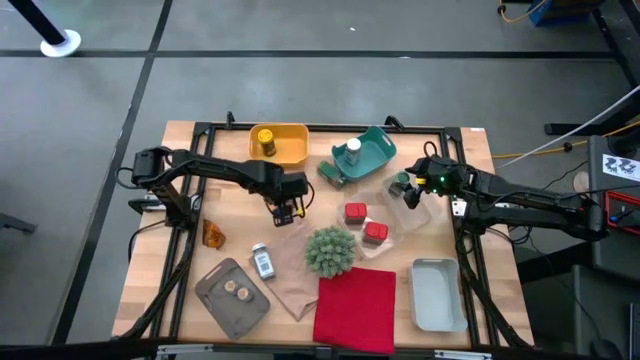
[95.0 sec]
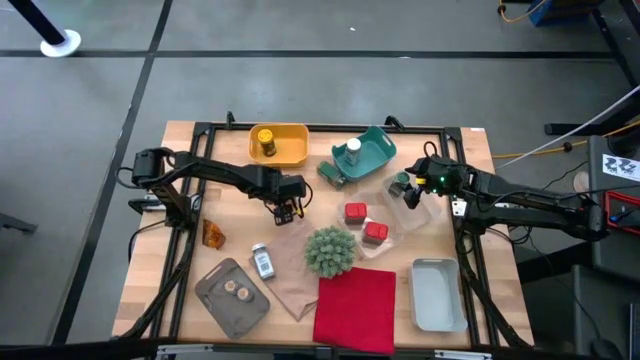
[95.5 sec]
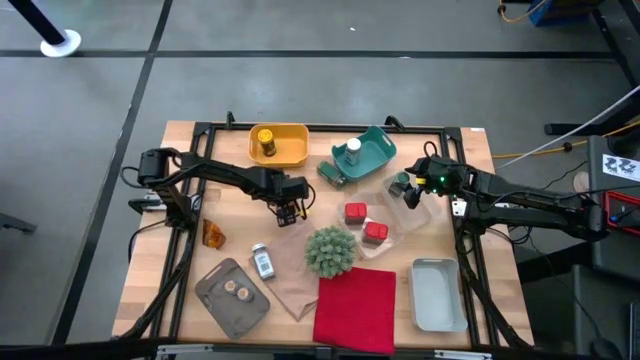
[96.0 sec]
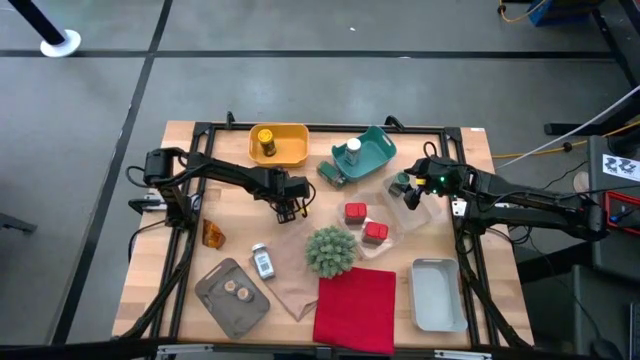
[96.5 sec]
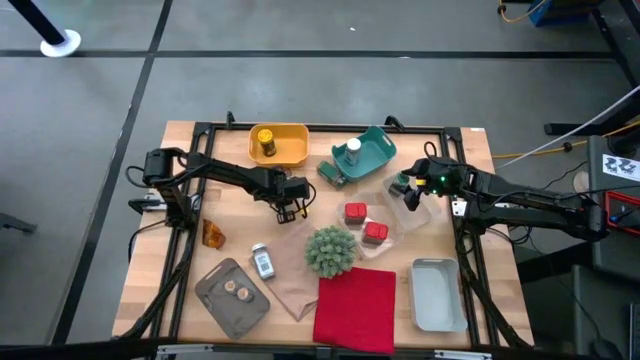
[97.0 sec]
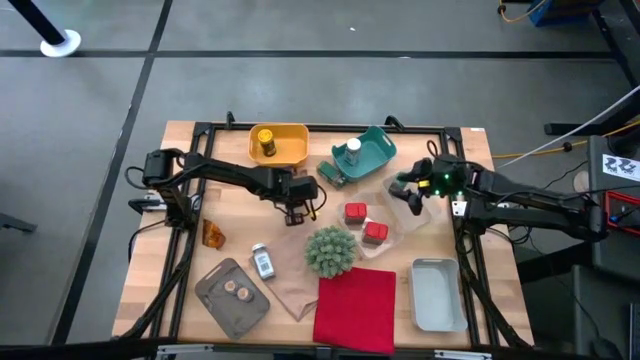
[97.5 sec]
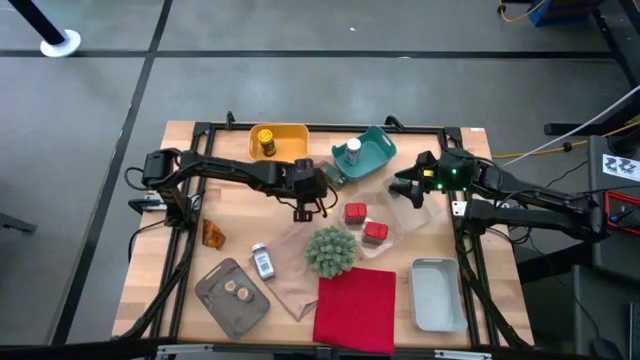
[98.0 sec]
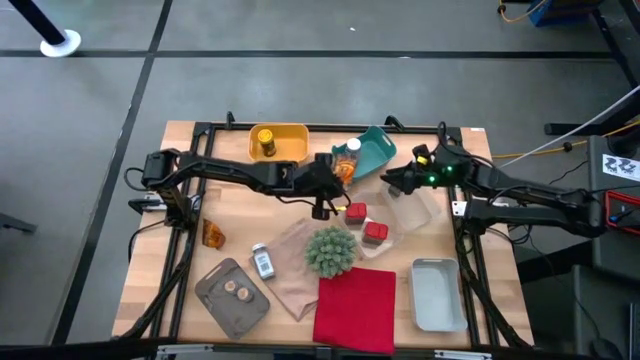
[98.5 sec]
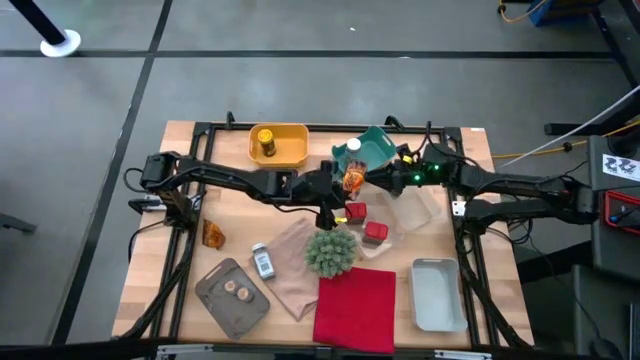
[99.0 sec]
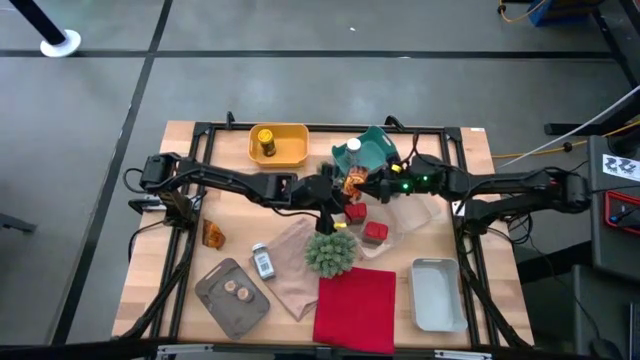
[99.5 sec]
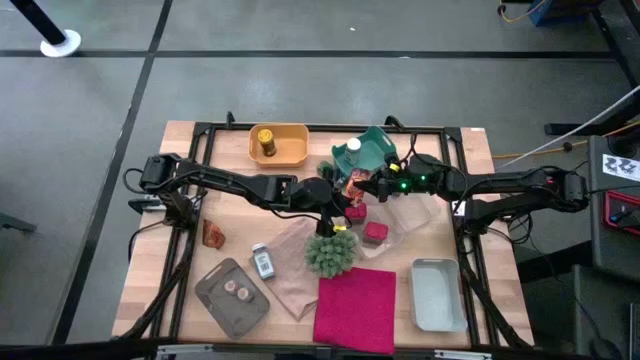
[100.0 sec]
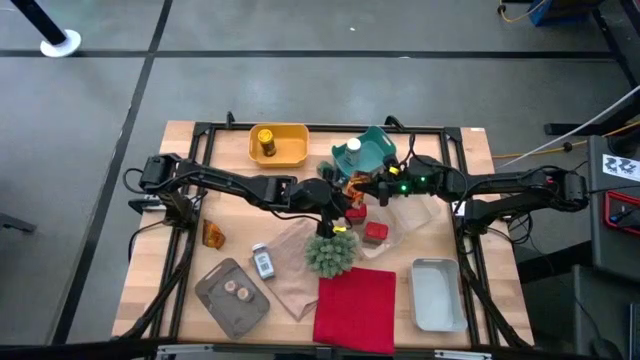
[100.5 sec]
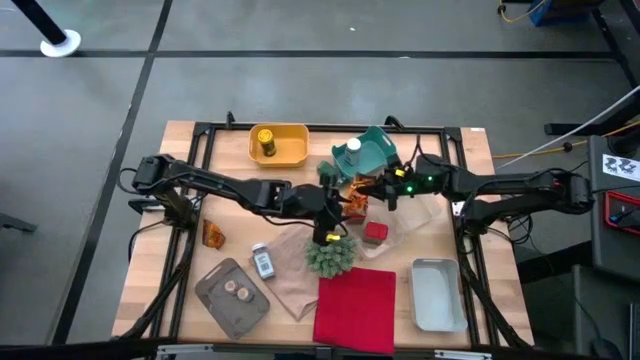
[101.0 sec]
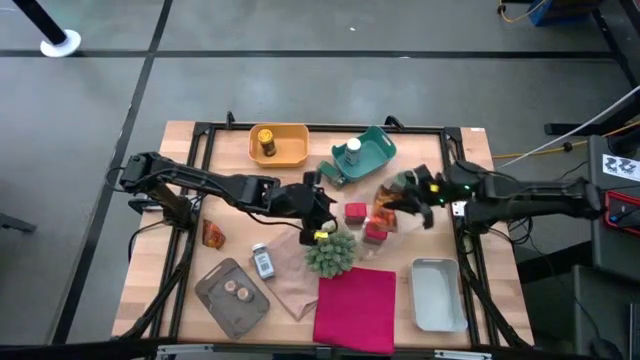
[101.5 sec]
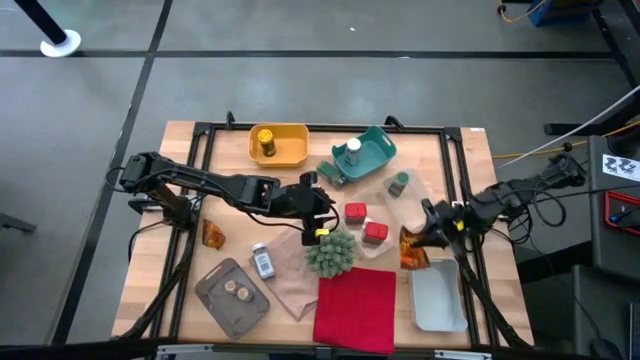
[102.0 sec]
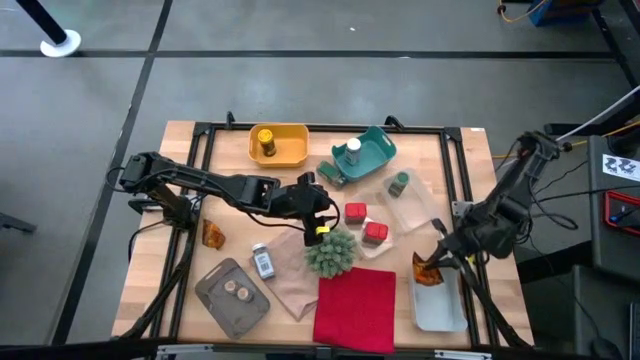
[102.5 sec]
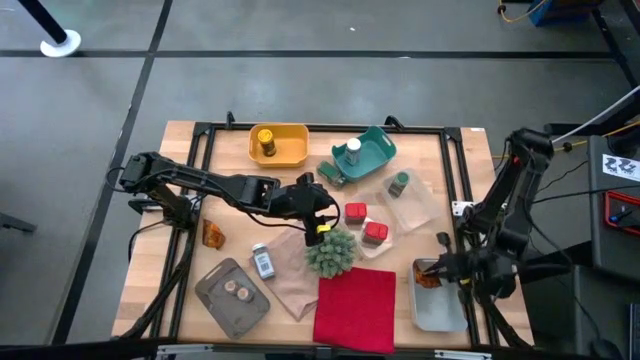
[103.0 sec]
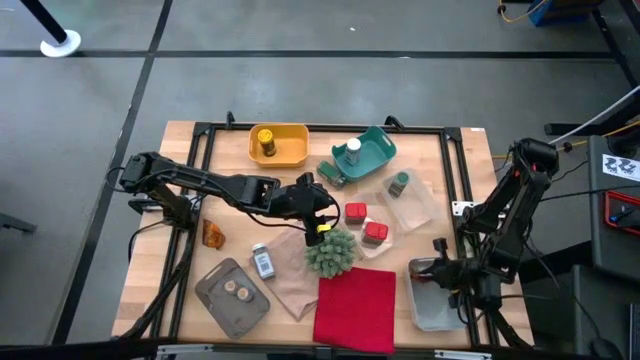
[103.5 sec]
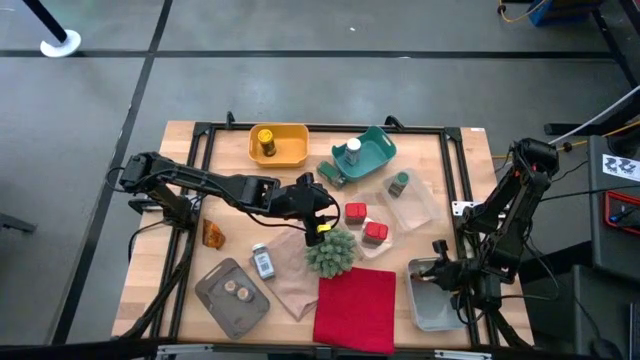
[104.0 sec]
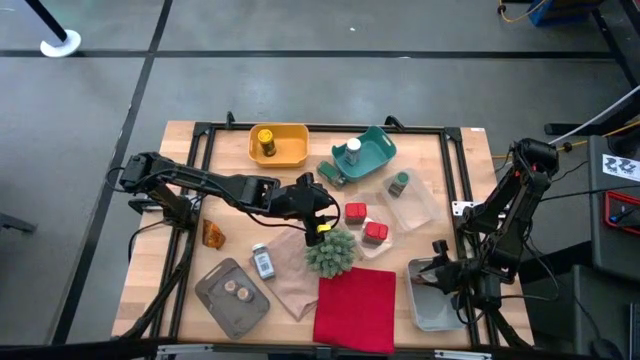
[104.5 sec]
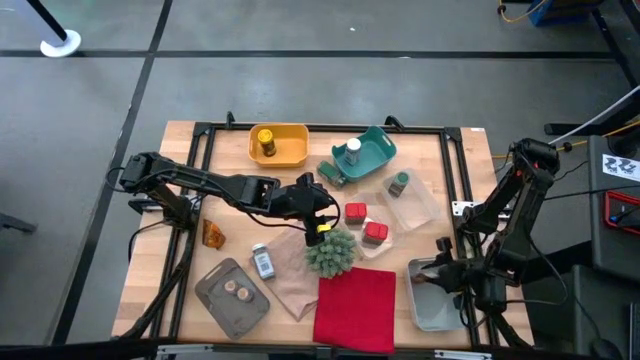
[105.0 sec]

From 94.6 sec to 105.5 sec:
Task: Sort spices by type
Put the orange seasoning pack into the gray bin

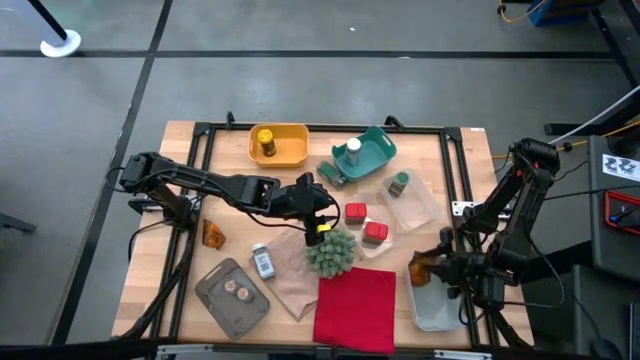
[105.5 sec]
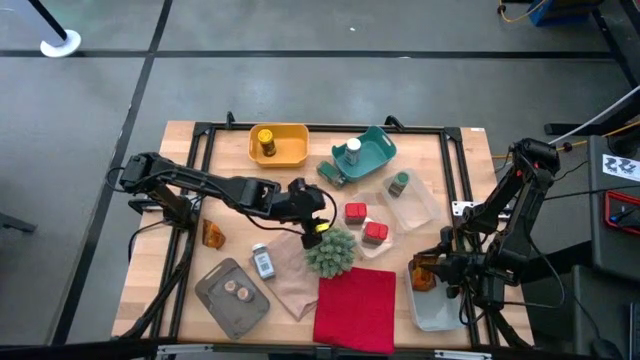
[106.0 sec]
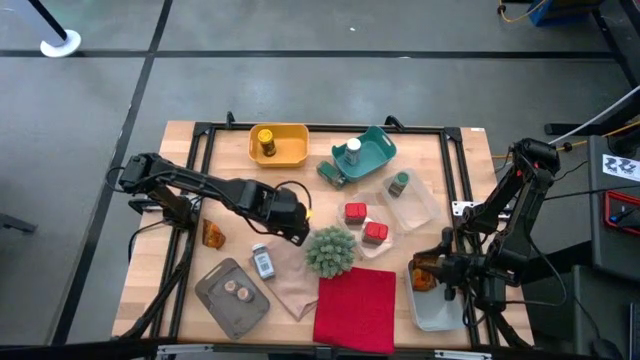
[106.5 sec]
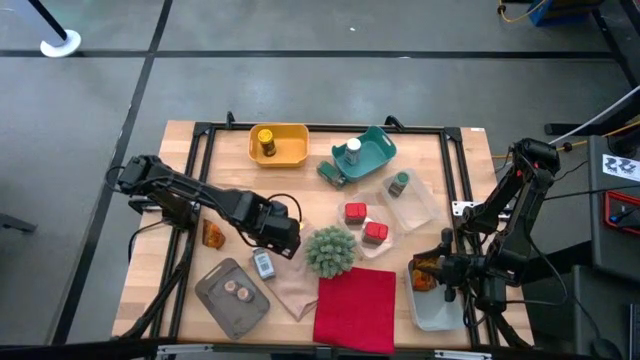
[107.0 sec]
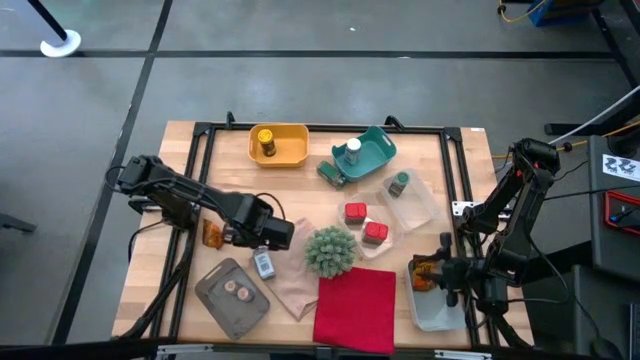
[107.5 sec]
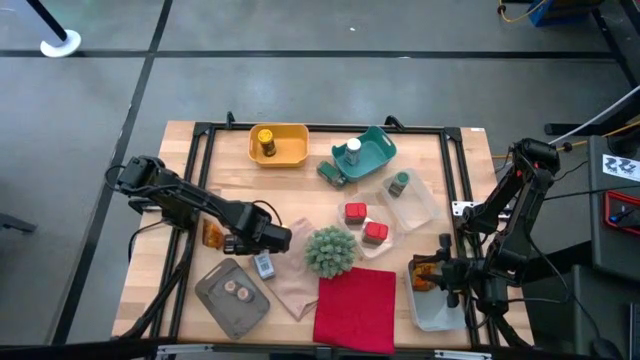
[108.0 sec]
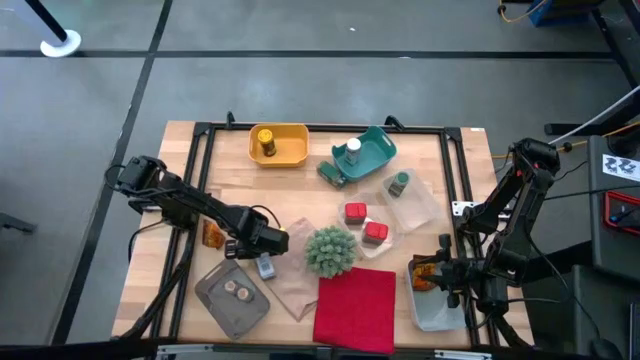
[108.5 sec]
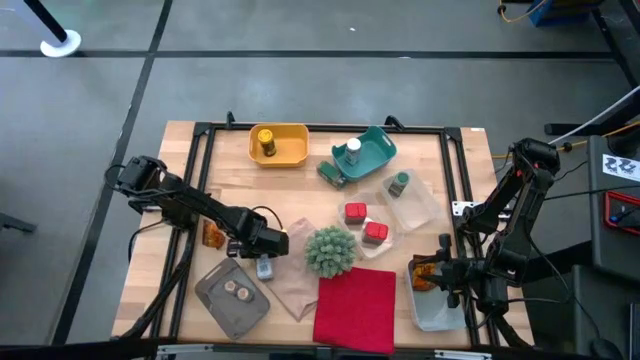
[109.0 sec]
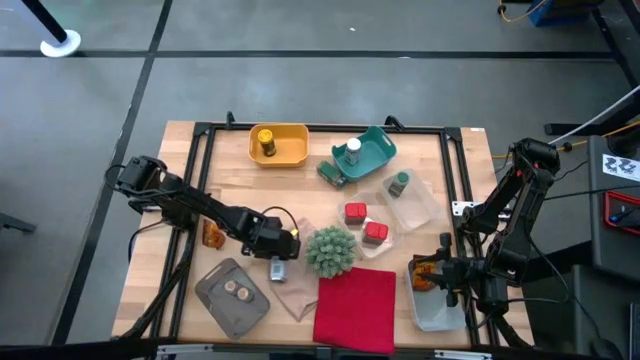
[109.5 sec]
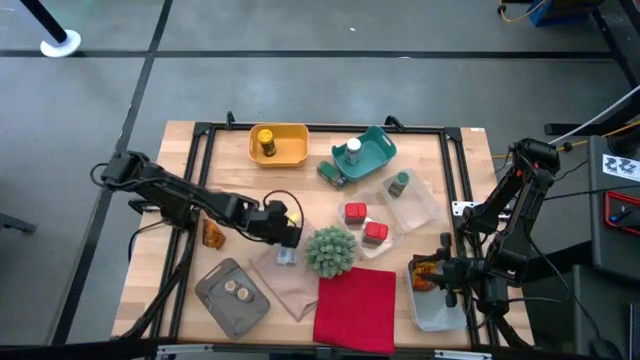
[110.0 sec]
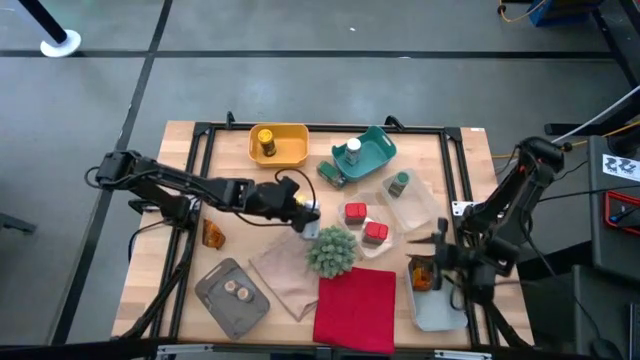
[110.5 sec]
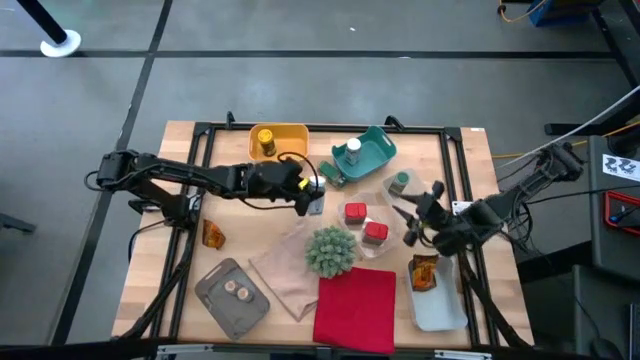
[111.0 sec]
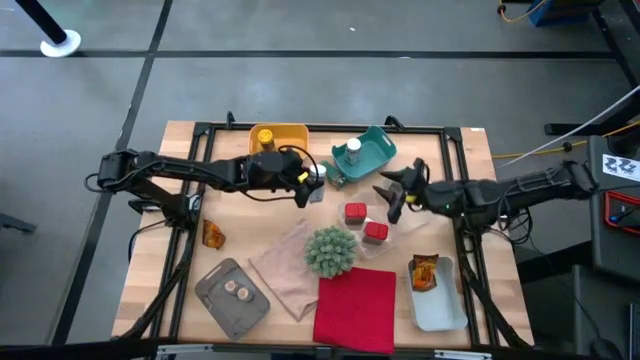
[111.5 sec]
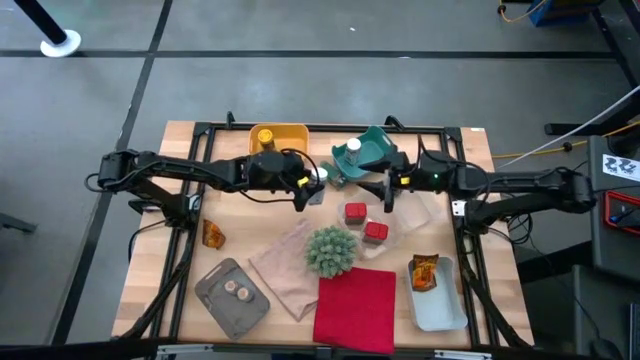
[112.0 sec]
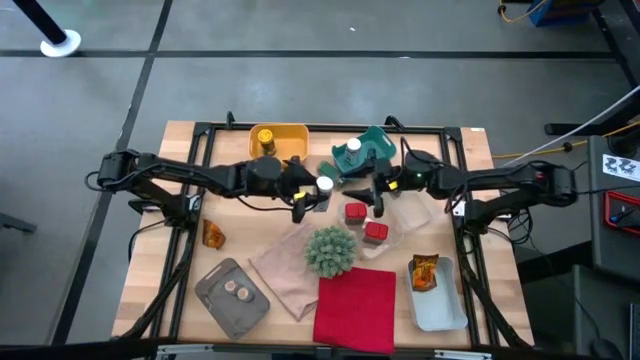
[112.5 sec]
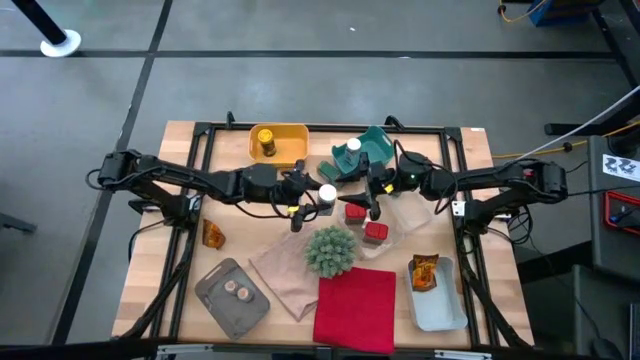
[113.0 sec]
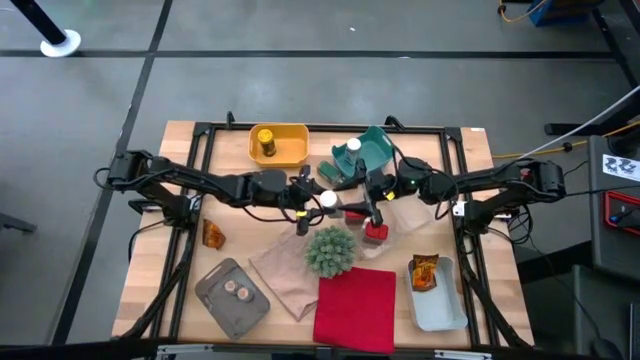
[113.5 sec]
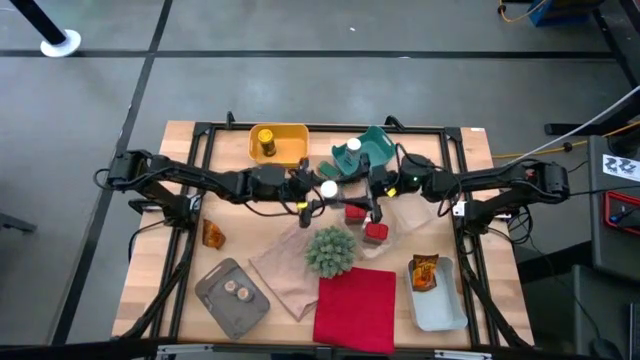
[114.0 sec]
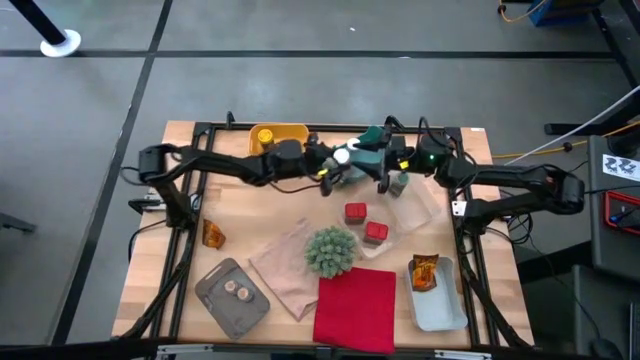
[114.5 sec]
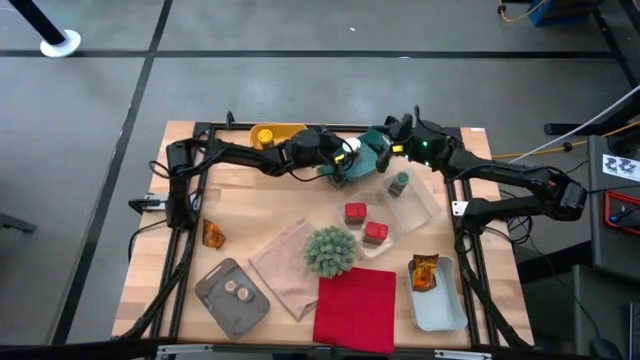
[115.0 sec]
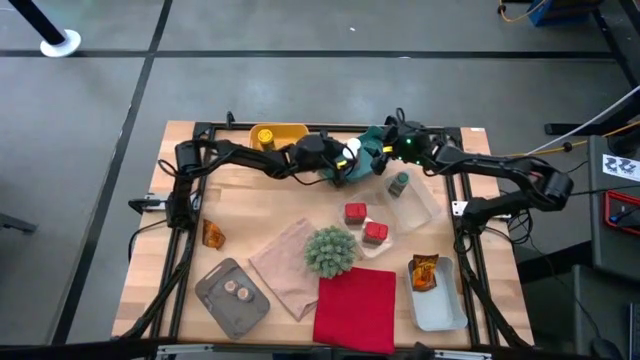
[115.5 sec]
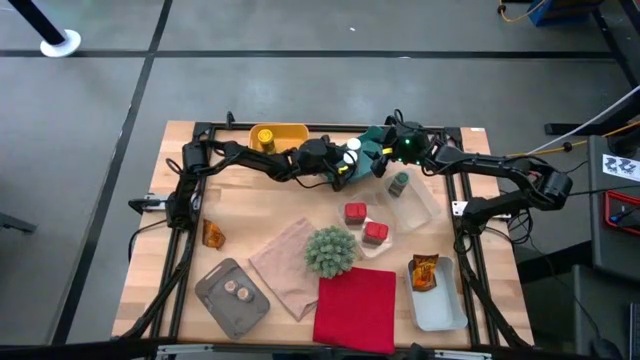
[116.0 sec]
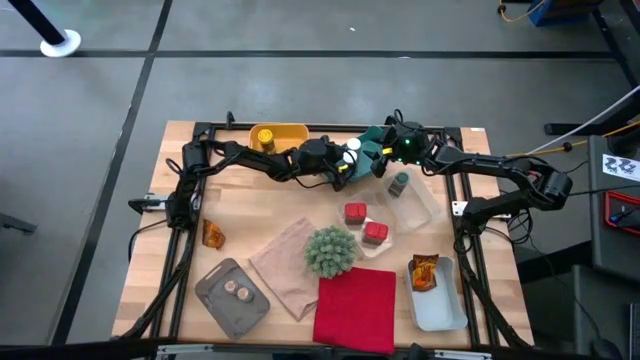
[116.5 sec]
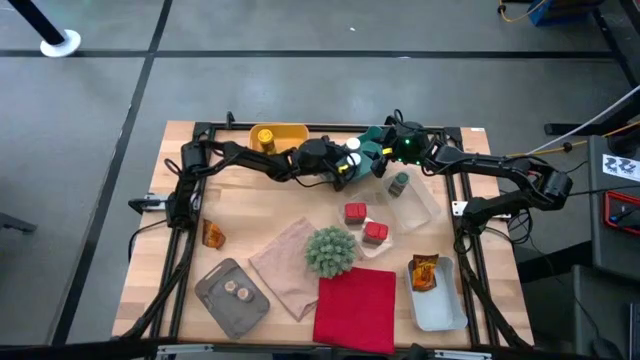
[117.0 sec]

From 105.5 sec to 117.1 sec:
Put the white seasoning bottle into the green bin
